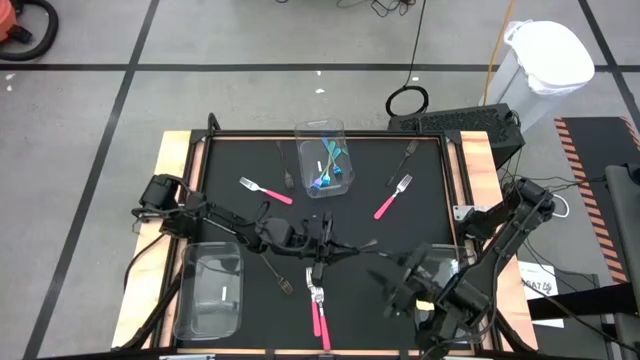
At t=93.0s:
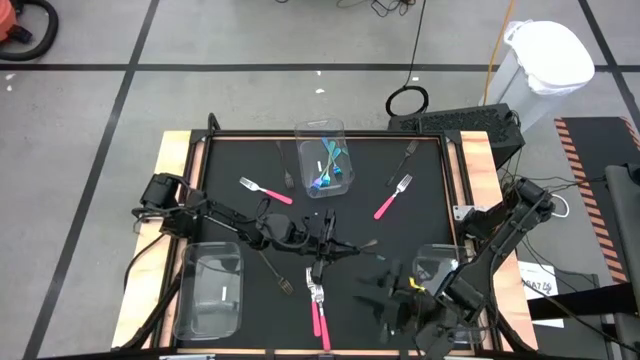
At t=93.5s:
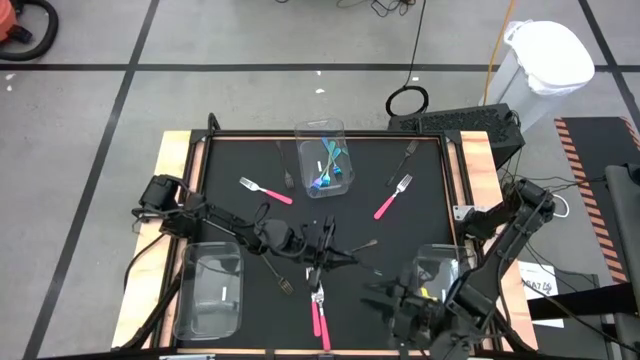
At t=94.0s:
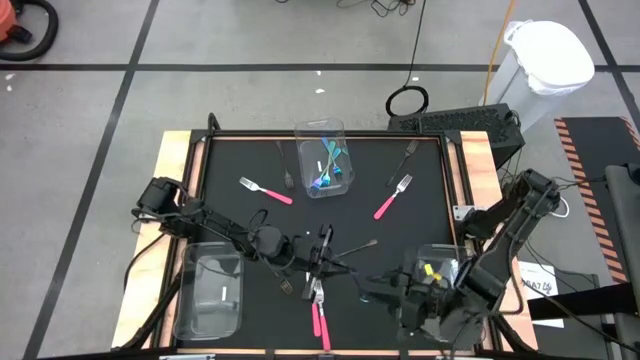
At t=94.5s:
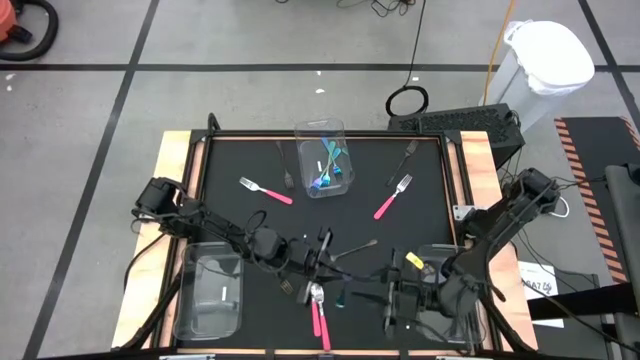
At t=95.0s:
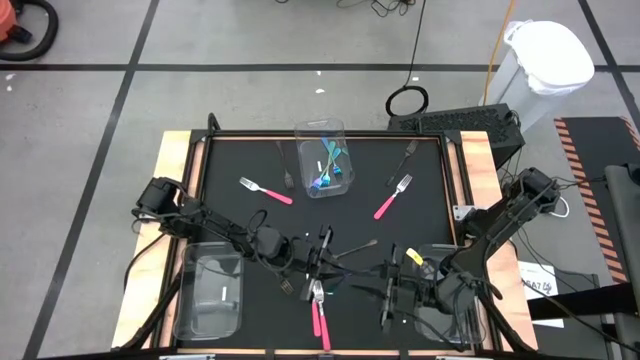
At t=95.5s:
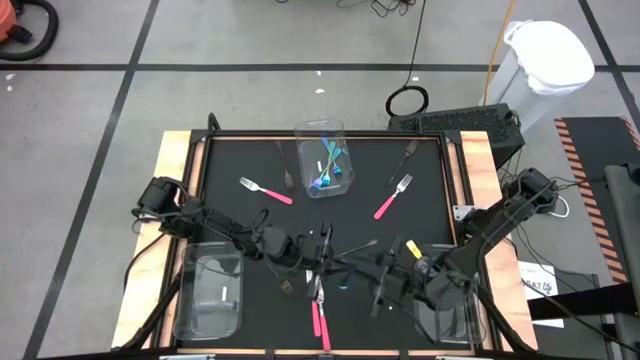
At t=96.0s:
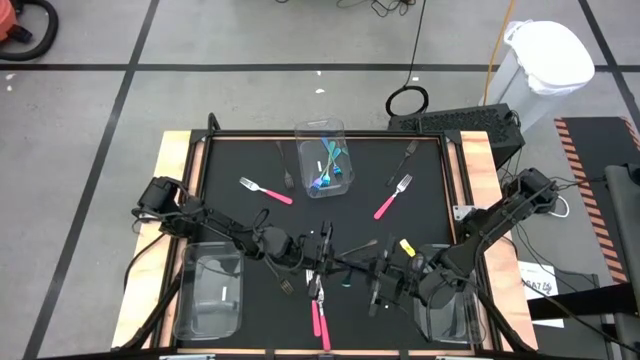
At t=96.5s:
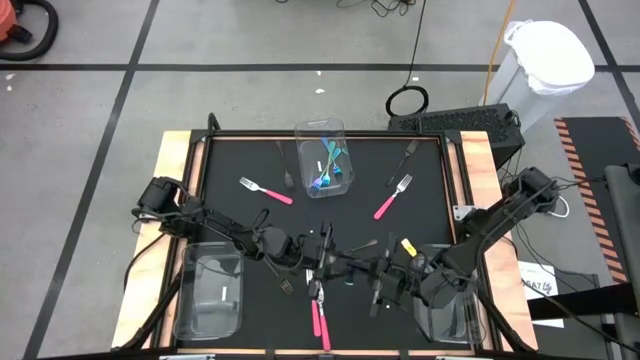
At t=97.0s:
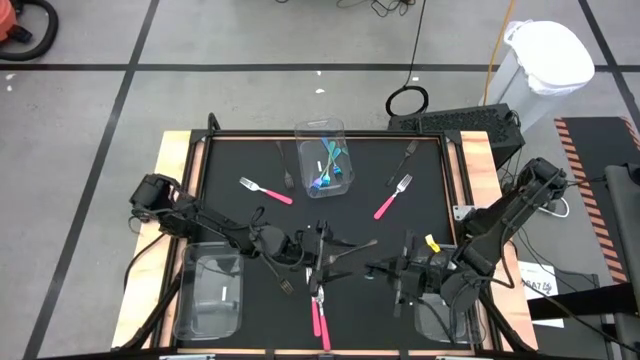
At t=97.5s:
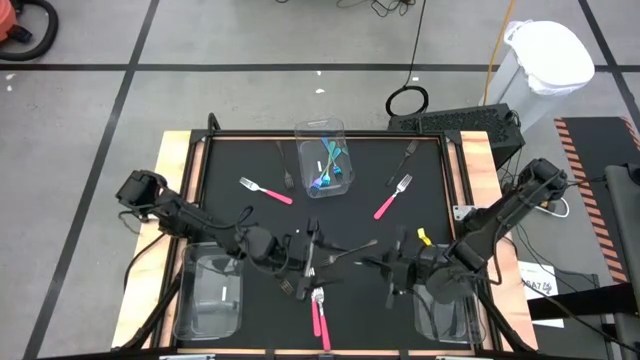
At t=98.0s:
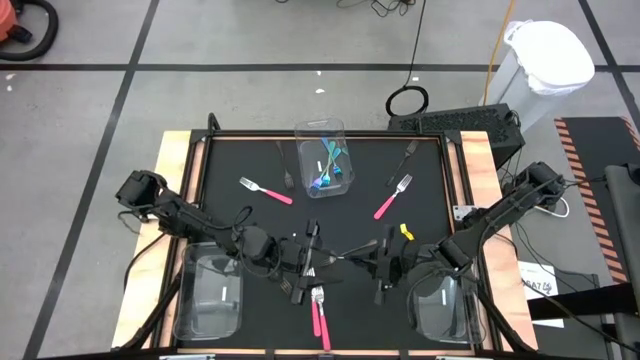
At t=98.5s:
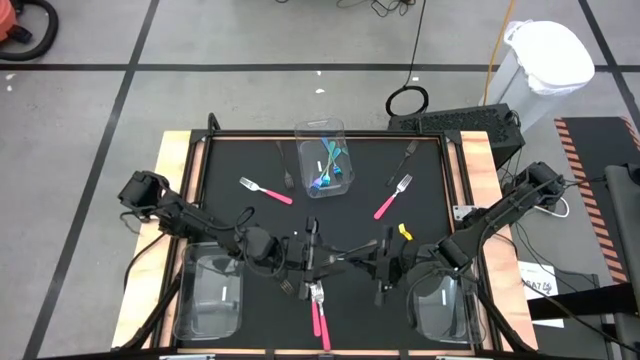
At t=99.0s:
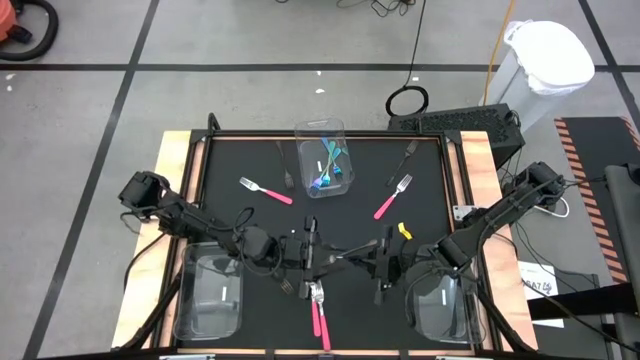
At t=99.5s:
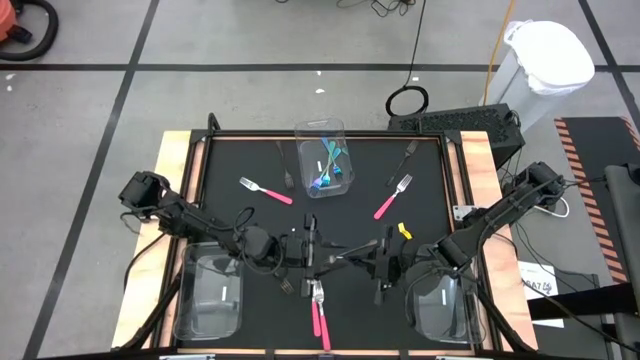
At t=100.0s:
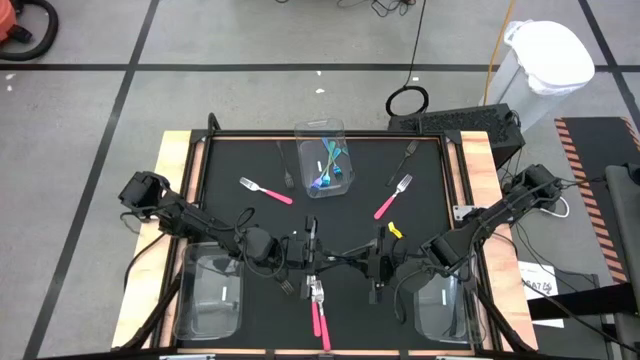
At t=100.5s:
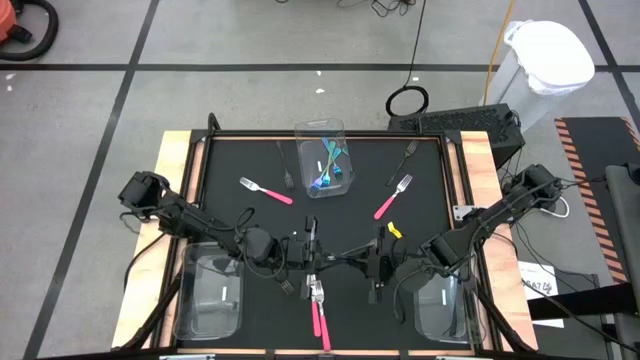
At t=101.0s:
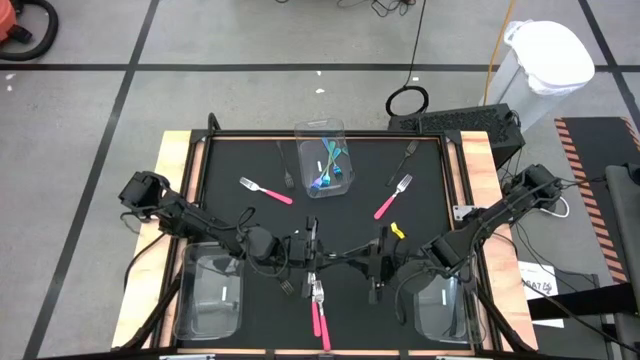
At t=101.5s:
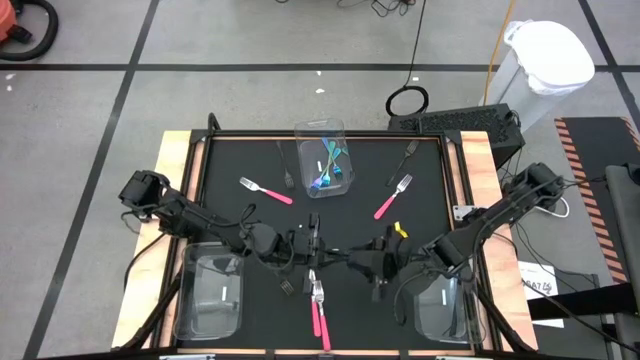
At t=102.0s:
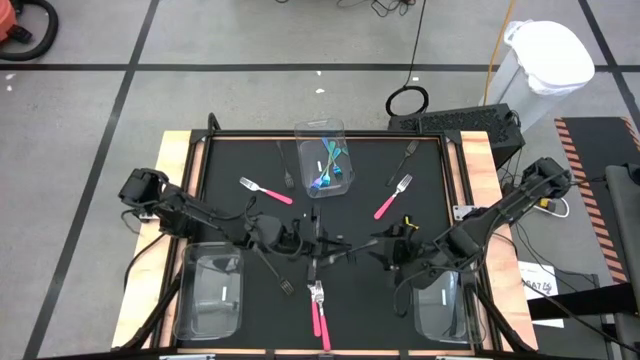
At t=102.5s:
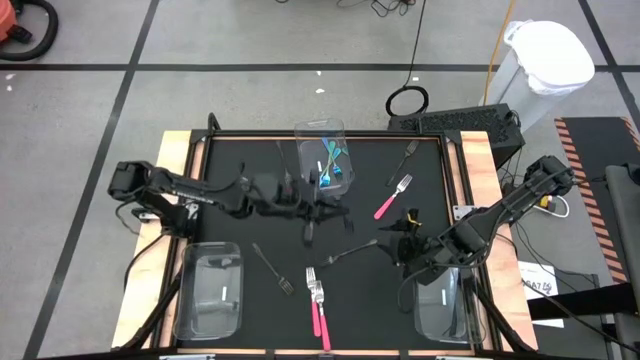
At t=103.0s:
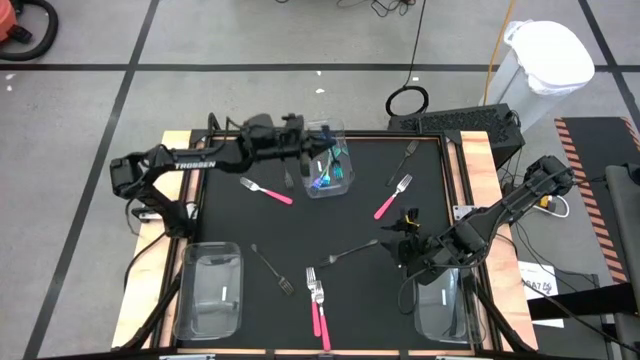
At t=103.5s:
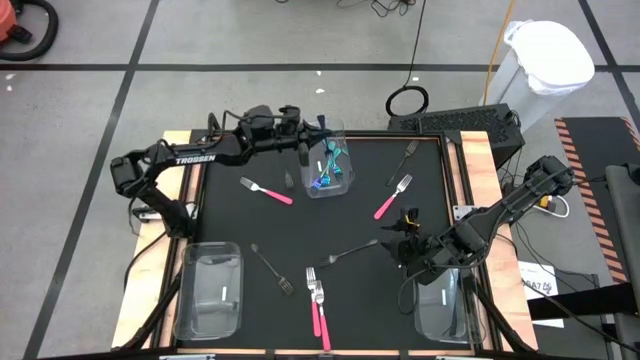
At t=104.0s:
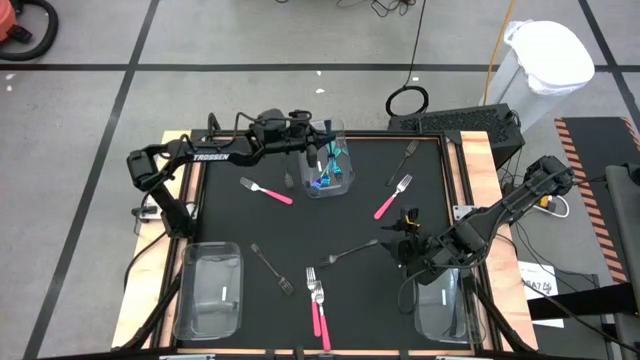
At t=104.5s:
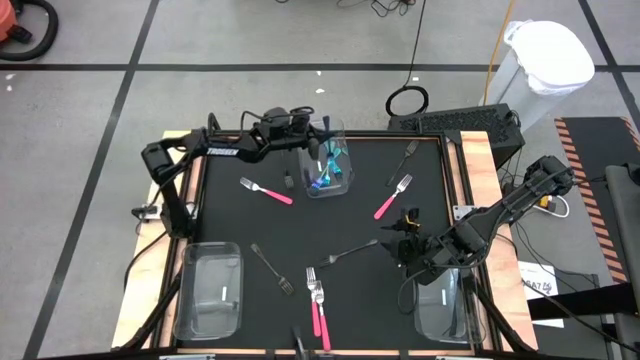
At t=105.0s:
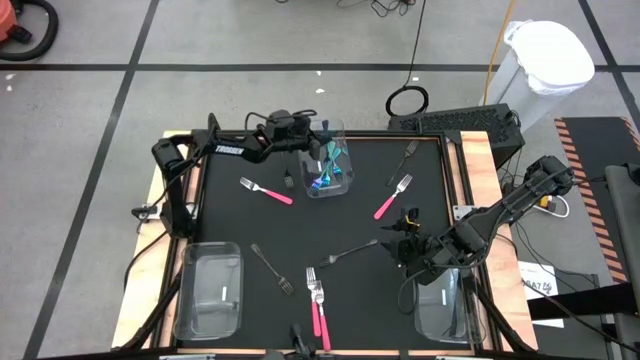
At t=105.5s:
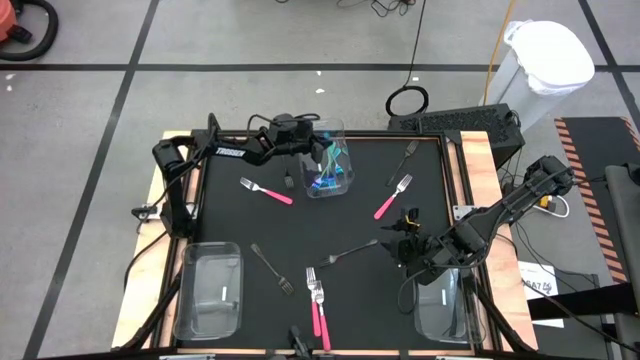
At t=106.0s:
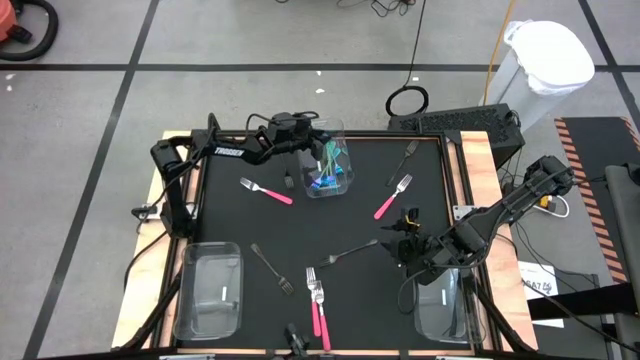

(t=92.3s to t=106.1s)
Task: Sort silverware by color (type)
Put the blue fork into the top transparent bin

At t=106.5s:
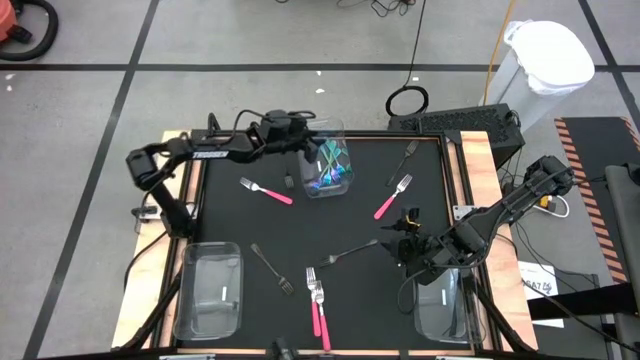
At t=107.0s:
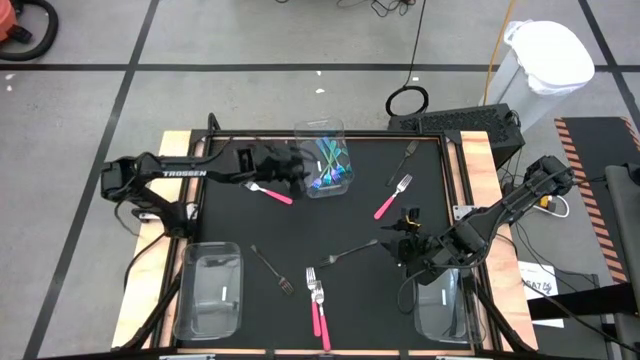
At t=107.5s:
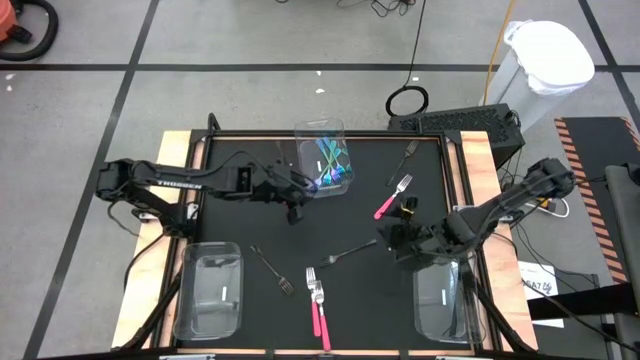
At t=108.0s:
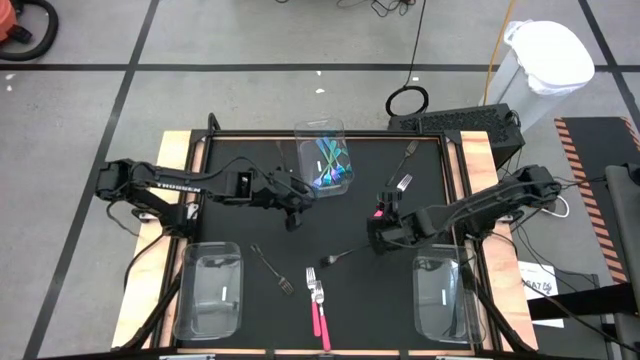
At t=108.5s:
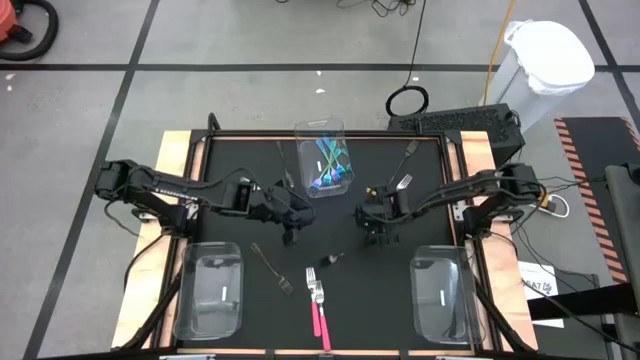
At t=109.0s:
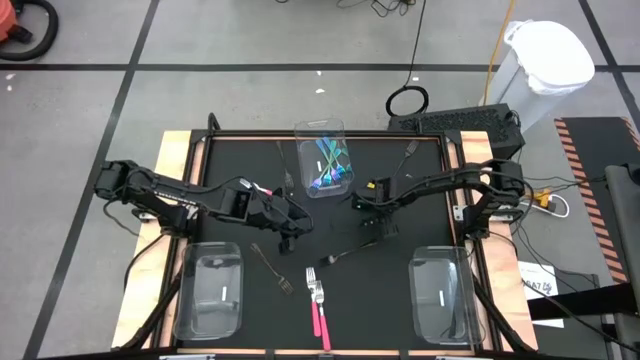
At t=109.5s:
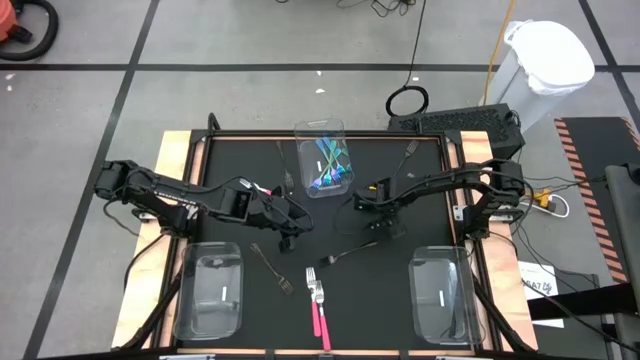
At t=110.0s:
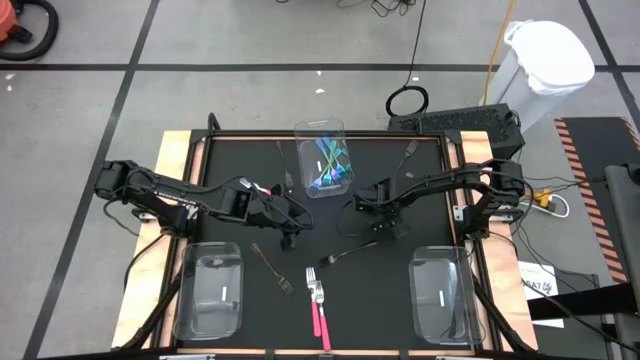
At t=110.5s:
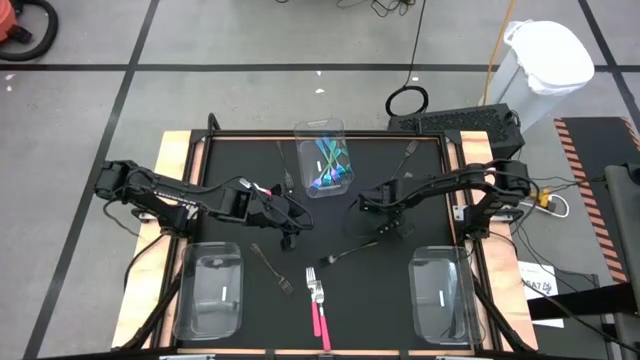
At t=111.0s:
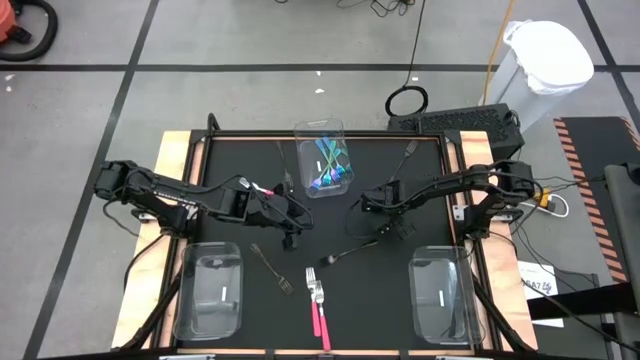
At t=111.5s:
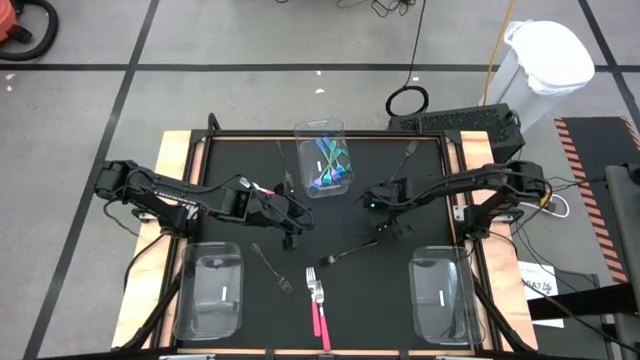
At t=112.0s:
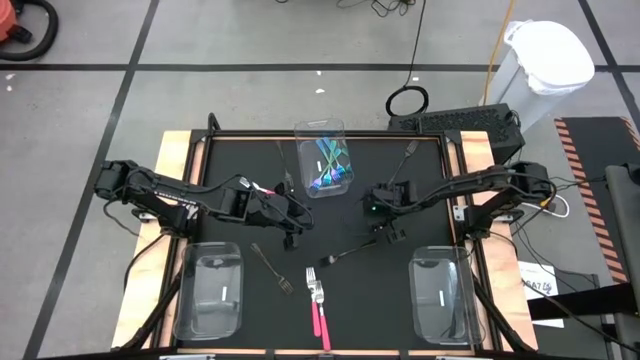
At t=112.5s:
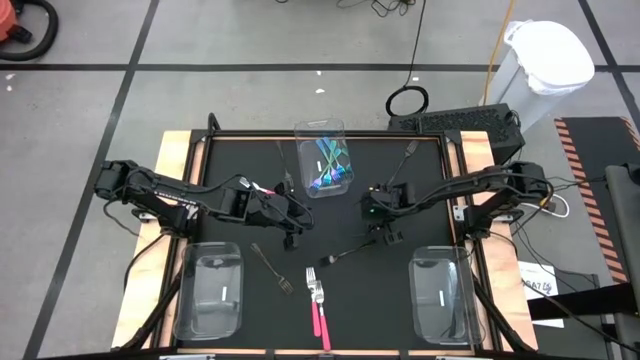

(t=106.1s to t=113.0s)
Put the pink fork into the bottom right transparent bin

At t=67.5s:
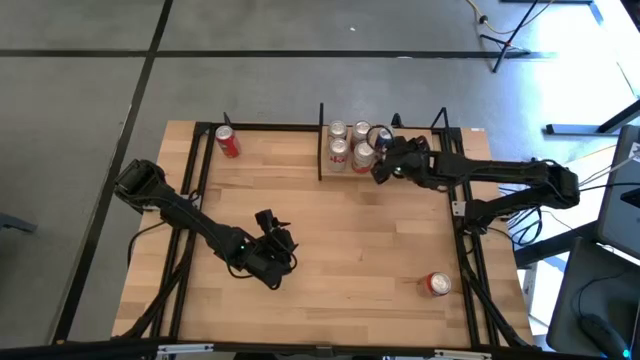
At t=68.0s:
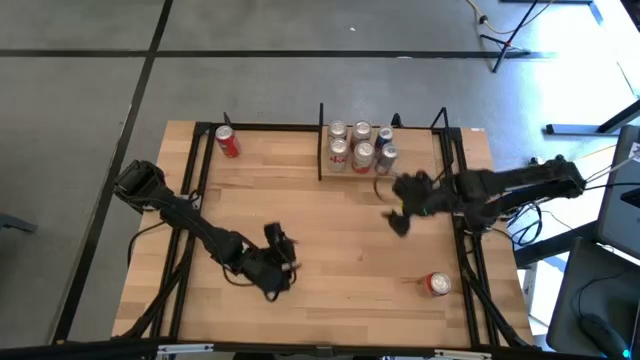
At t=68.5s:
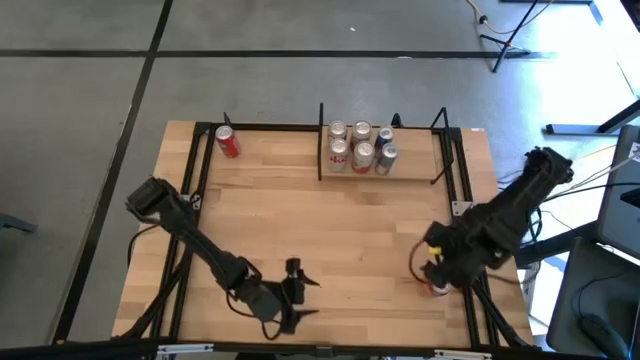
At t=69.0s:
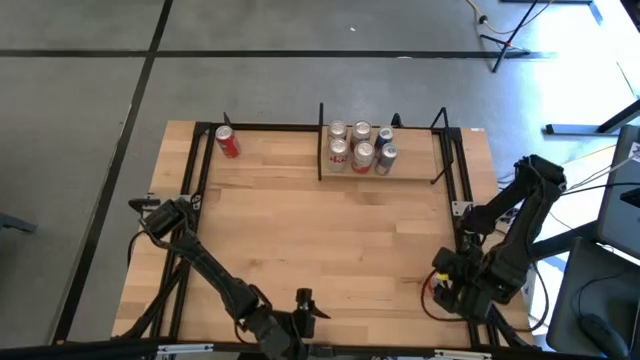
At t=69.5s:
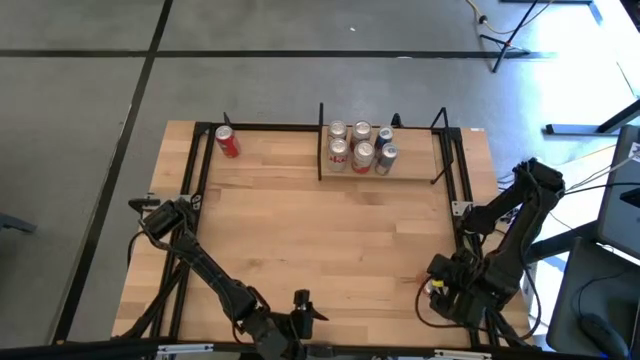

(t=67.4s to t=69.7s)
Task: Place canned beverage on shelf
Put the bottom red soda can on the shelf
